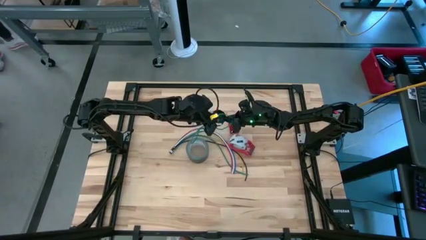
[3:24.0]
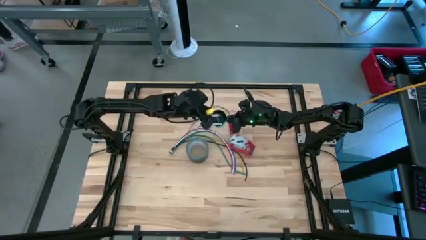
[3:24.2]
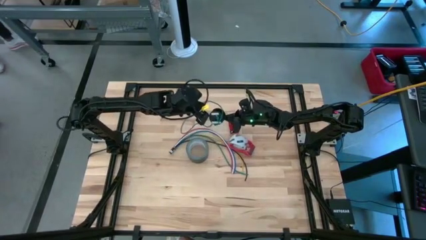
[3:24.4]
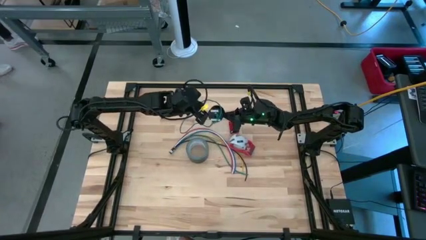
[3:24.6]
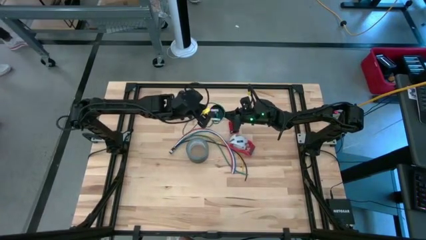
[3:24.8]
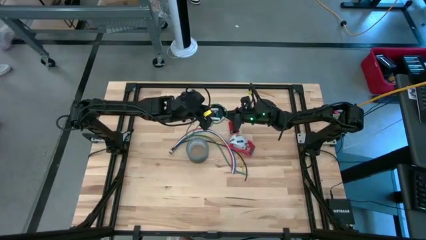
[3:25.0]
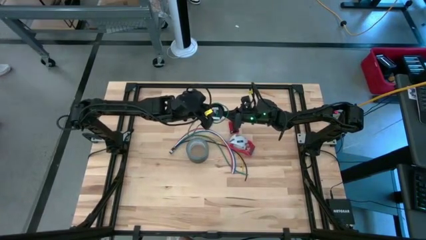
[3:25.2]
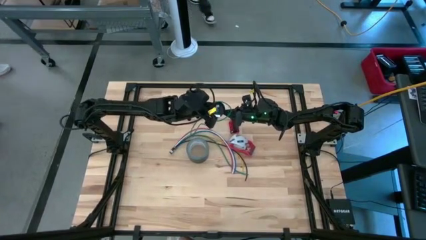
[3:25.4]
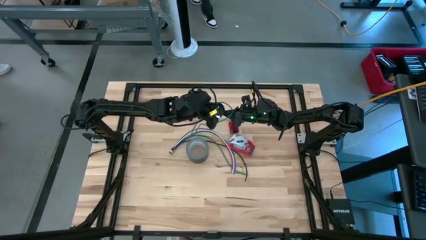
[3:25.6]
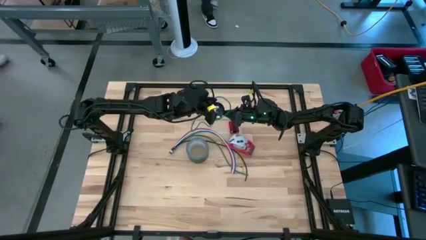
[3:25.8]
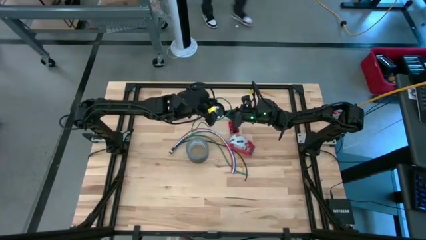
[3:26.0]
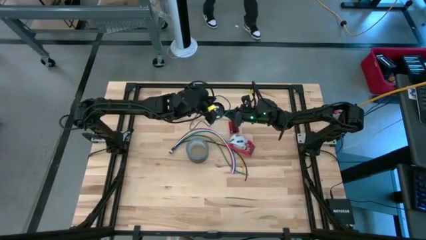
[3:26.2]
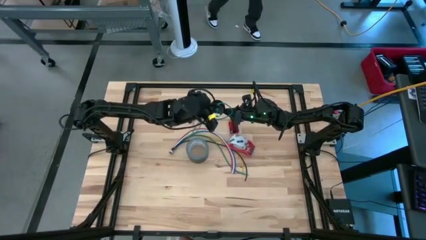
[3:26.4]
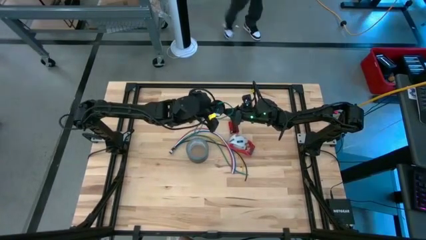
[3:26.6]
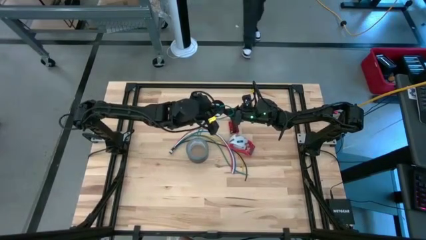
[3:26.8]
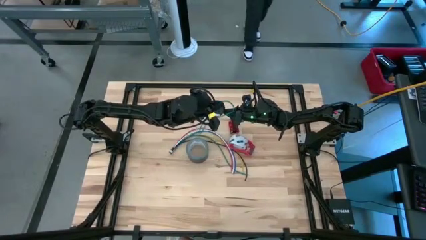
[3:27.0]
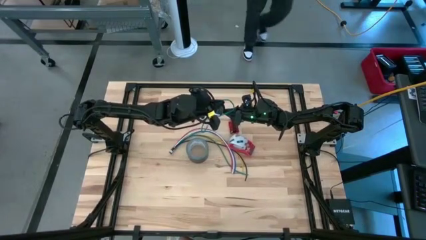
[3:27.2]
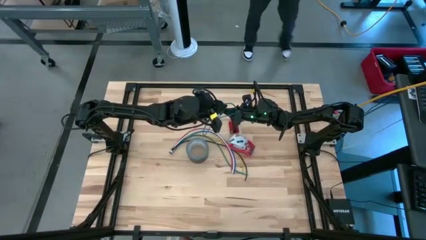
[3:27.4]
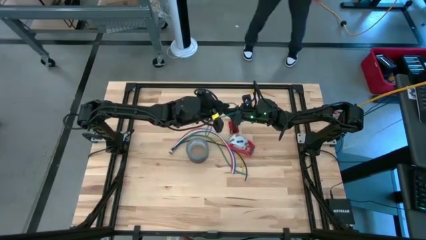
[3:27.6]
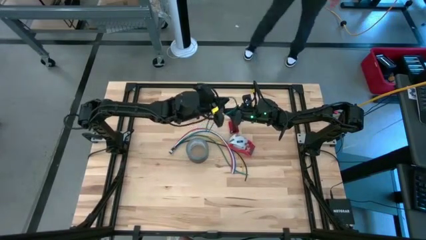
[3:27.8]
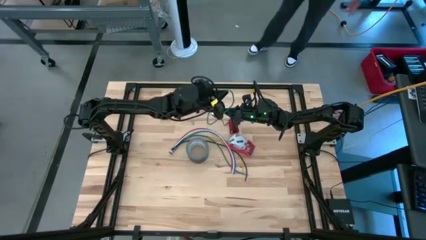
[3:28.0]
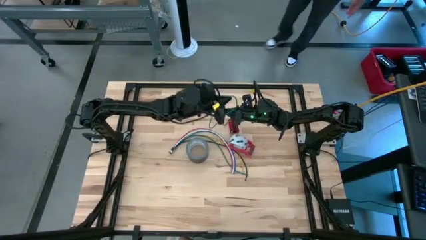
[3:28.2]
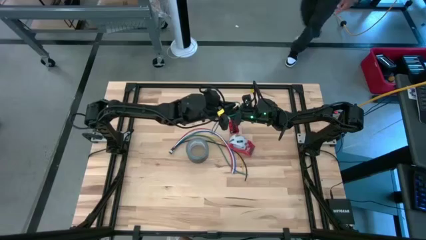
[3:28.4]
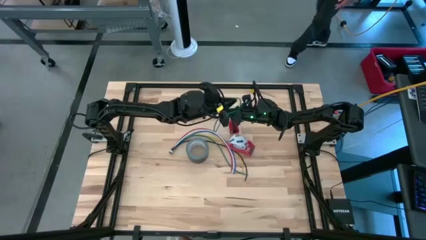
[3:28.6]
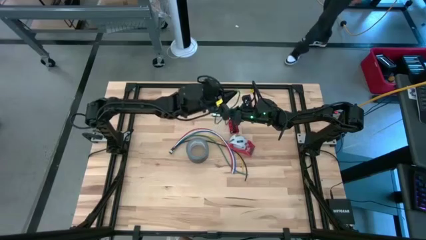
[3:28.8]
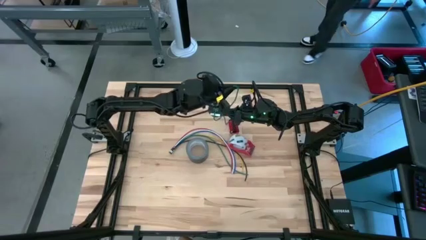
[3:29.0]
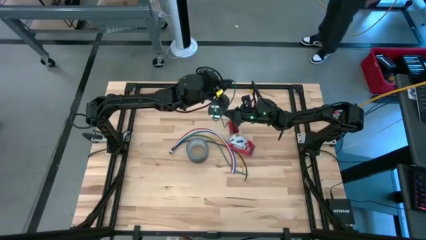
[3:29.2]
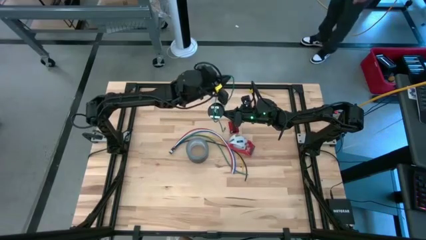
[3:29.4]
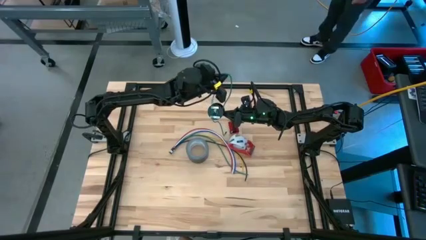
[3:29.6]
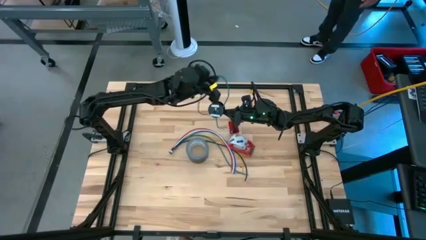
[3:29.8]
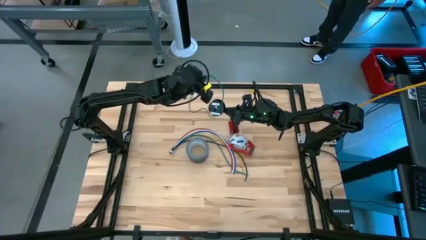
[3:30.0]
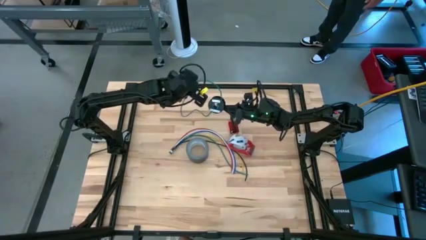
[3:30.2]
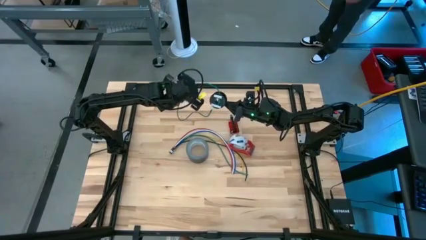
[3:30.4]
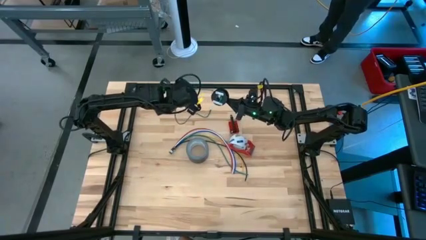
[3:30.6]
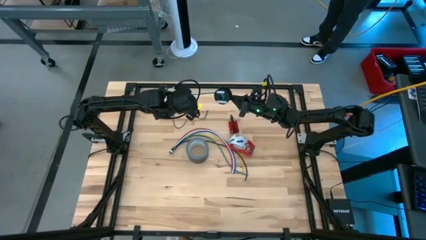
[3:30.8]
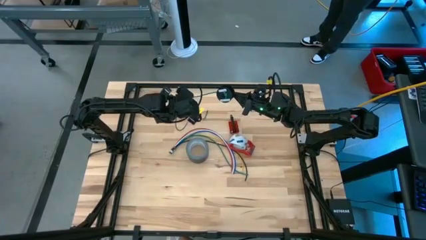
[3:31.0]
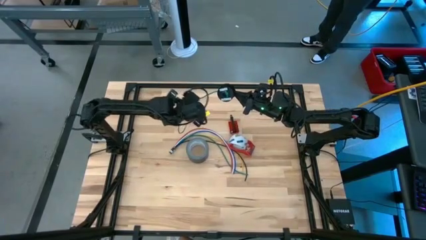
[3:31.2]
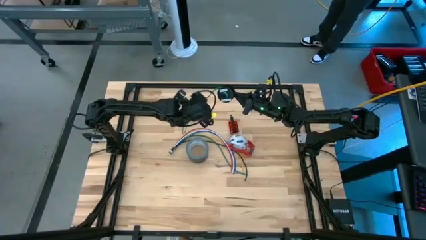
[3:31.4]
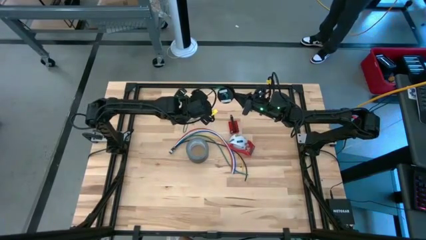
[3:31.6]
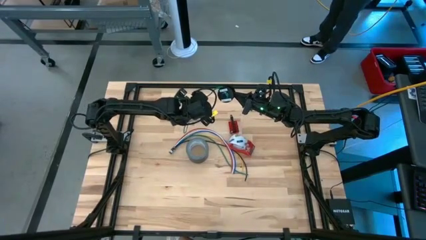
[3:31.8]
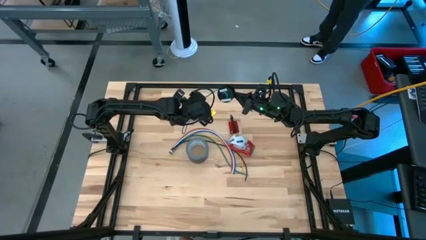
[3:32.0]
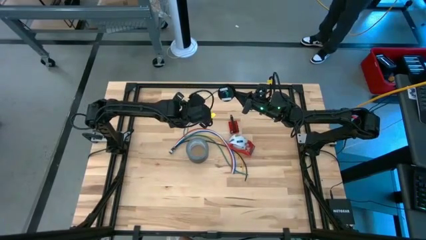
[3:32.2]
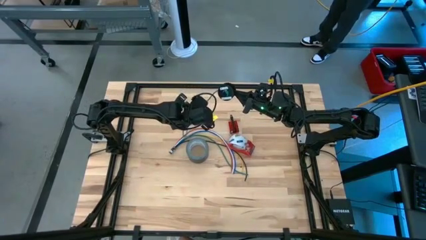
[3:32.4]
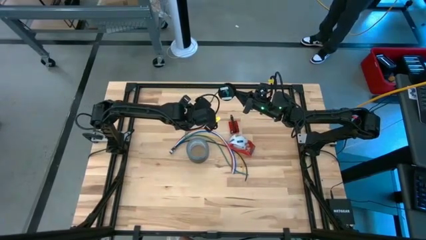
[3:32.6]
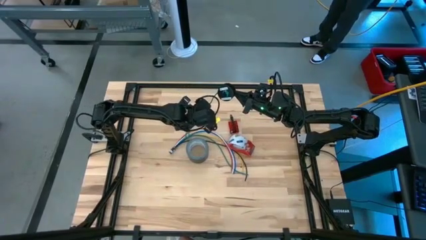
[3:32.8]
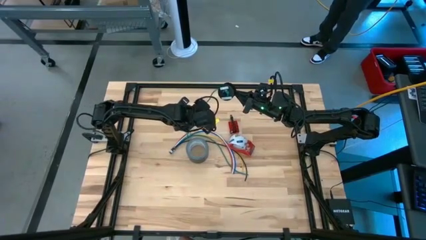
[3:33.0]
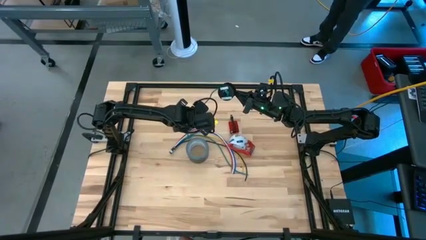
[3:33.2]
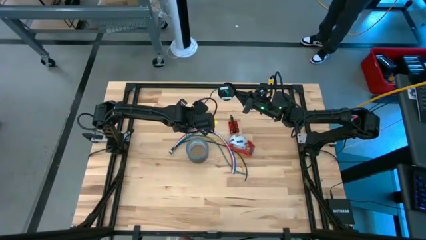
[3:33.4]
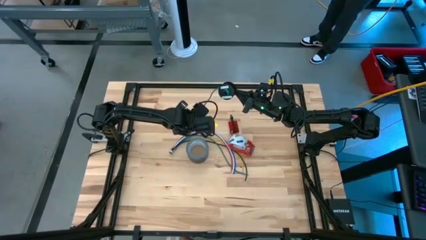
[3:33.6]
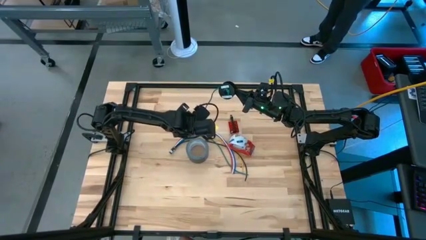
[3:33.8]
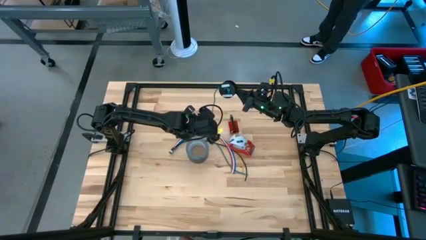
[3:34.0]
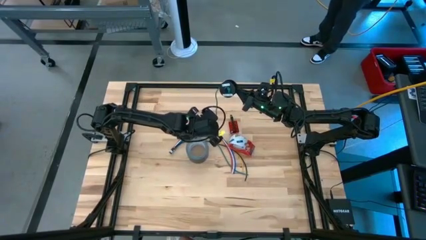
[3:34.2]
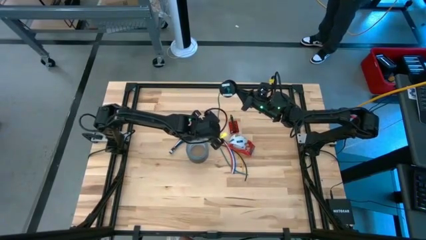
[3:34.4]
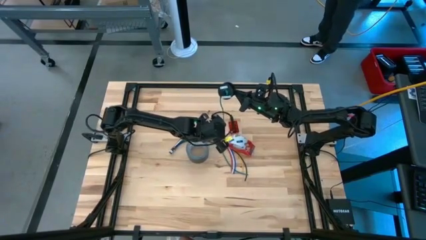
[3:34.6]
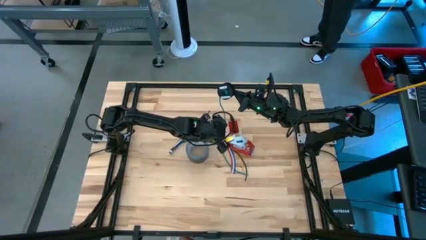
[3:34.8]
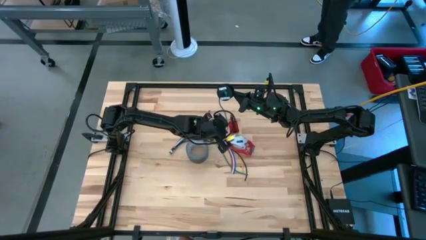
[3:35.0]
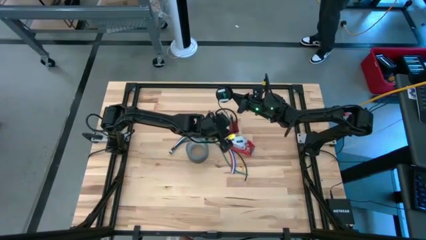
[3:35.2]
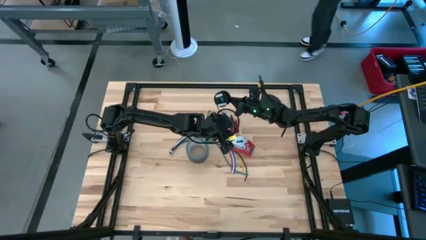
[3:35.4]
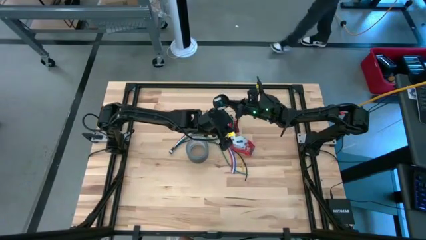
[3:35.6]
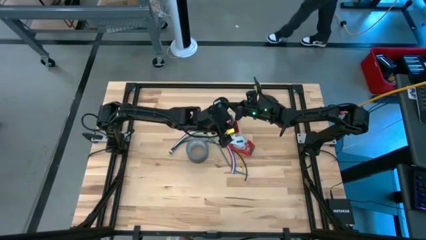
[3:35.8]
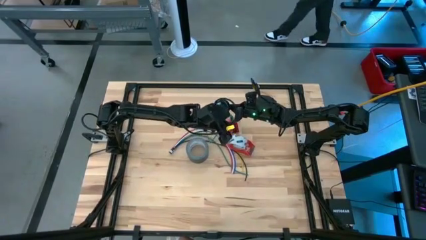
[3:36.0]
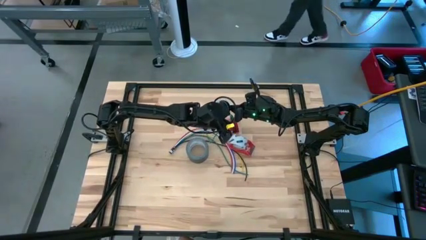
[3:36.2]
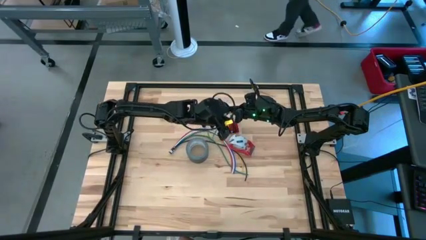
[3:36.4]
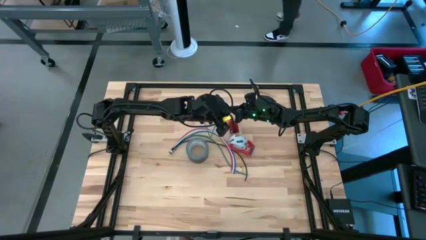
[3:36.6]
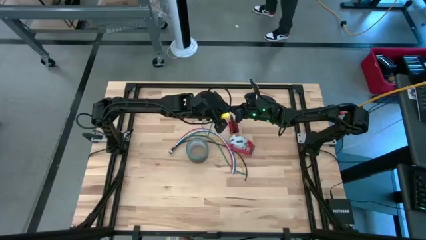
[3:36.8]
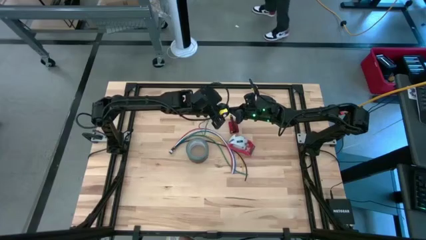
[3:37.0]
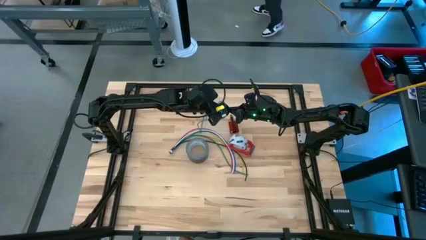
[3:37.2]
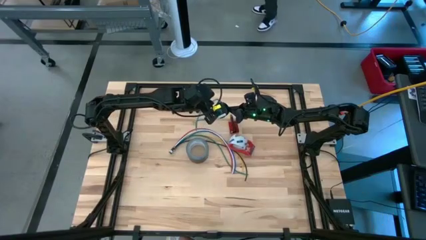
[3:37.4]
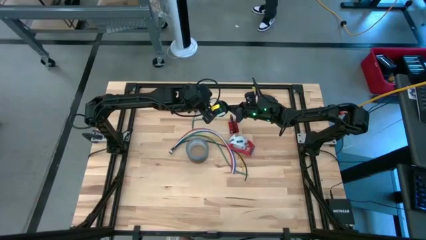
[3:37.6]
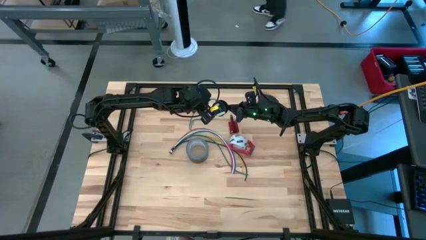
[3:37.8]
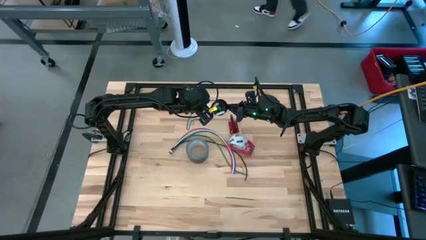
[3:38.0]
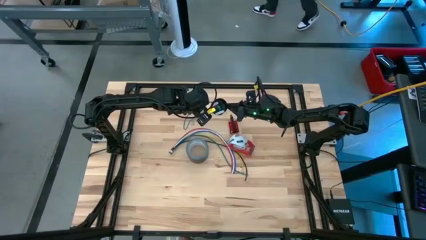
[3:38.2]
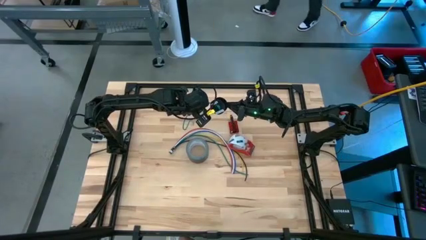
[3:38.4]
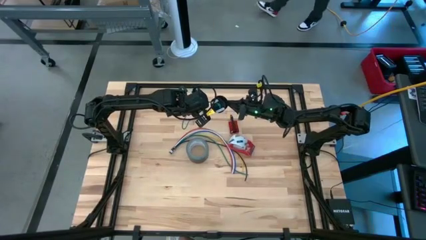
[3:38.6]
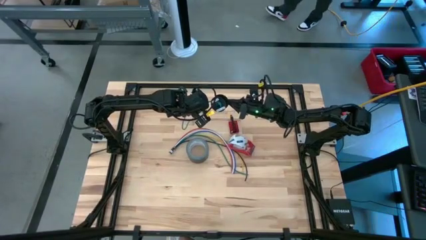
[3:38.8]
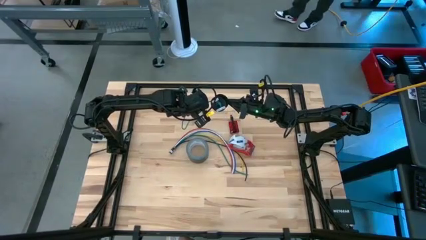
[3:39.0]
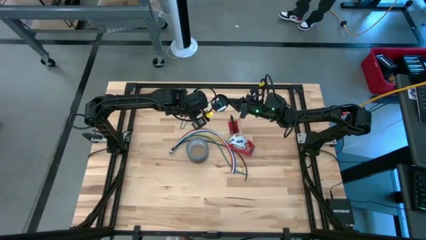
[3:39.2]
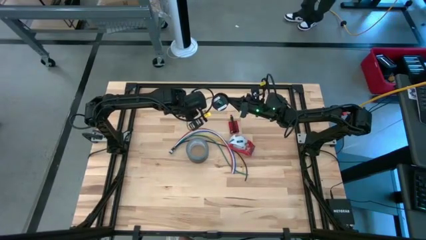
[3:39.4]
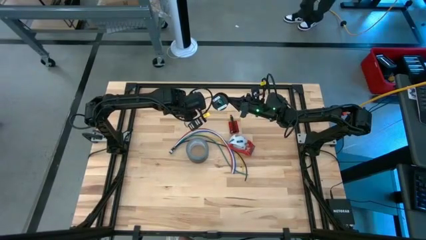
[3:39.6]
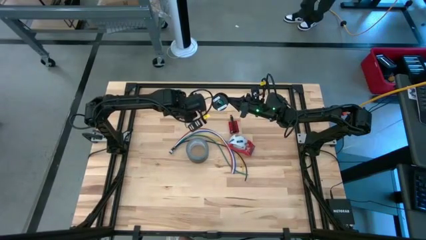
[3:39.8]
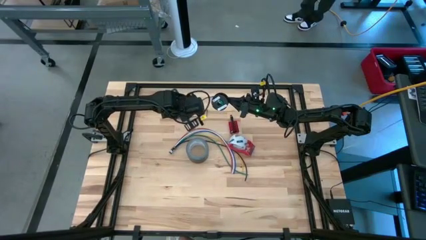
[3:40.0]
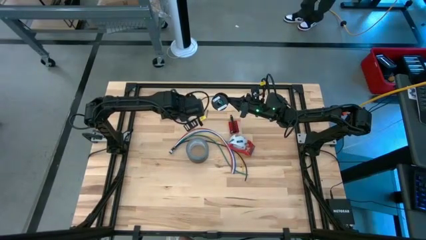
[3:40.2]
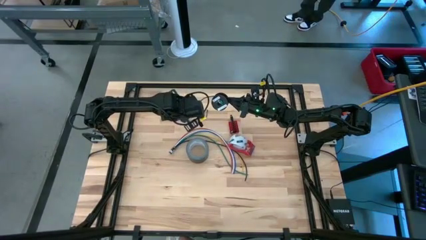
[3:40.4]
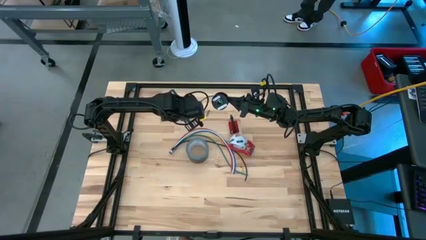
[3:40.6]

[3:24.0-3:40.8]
Task: Coil cords
Coil the green wire onto the black spool
